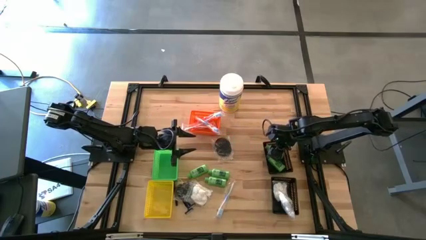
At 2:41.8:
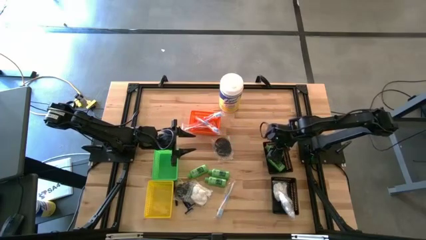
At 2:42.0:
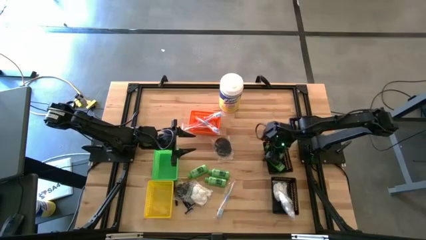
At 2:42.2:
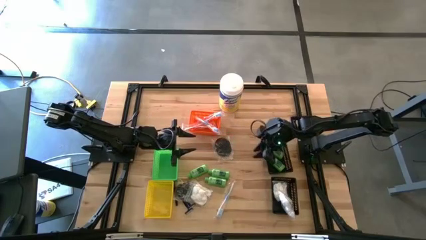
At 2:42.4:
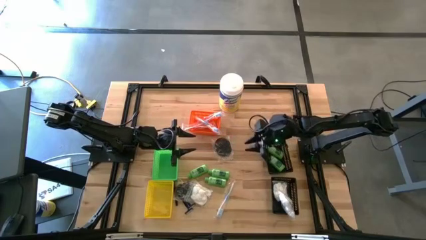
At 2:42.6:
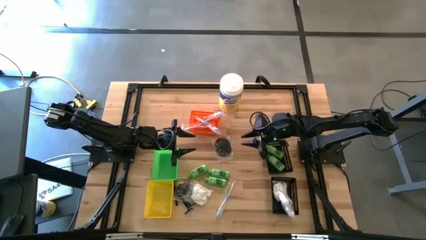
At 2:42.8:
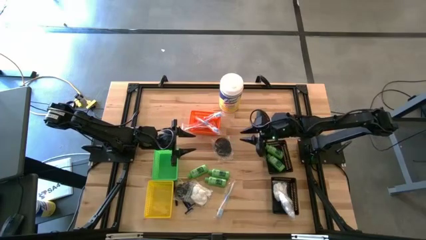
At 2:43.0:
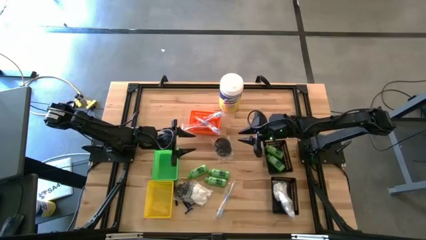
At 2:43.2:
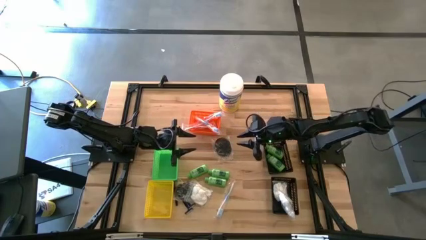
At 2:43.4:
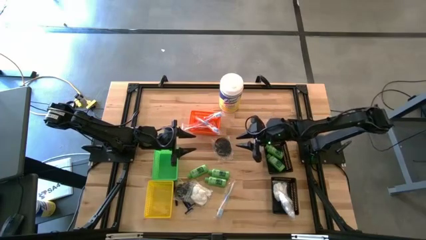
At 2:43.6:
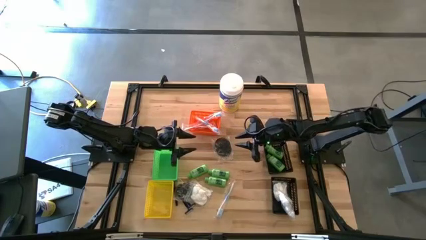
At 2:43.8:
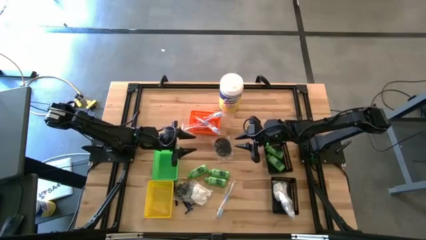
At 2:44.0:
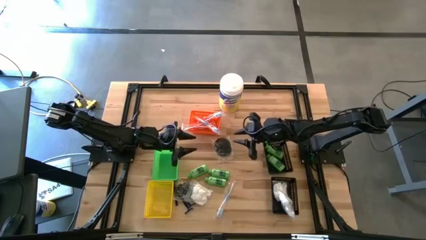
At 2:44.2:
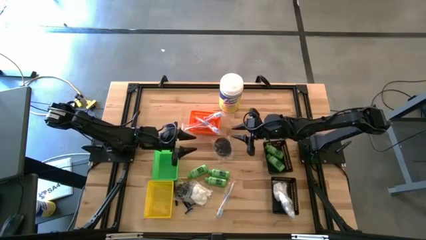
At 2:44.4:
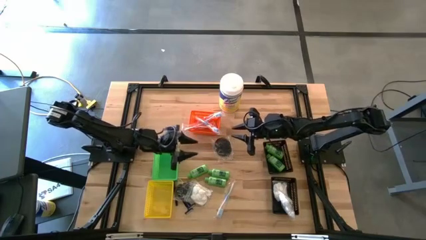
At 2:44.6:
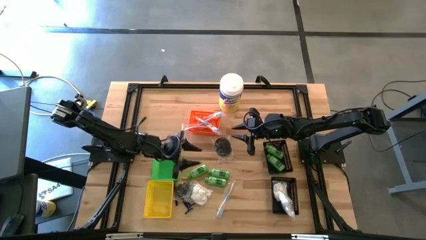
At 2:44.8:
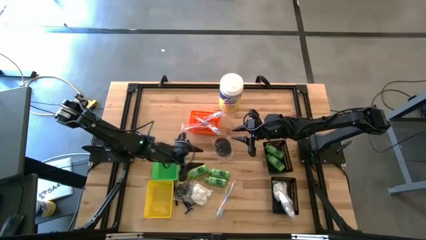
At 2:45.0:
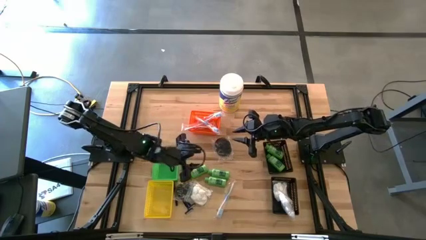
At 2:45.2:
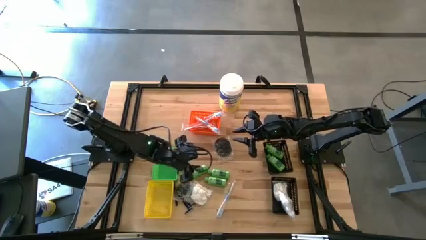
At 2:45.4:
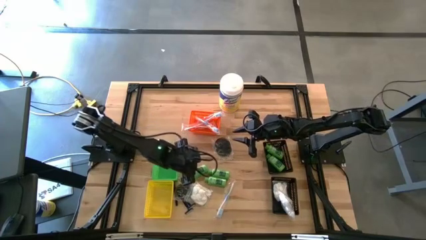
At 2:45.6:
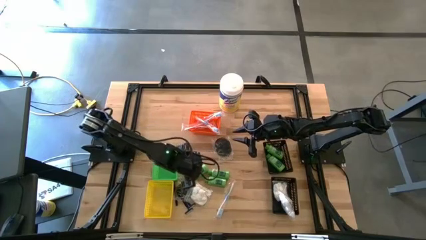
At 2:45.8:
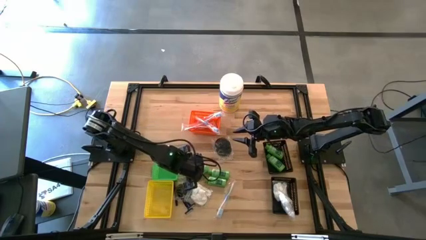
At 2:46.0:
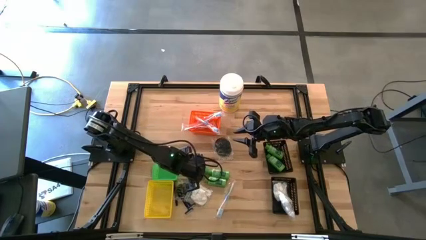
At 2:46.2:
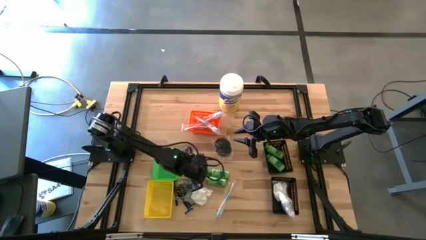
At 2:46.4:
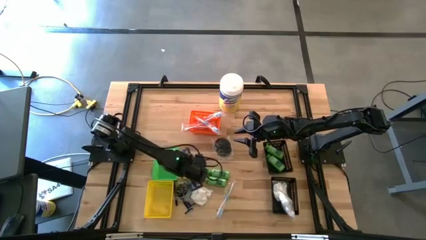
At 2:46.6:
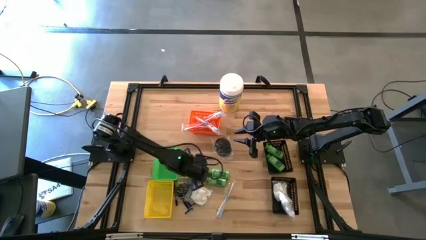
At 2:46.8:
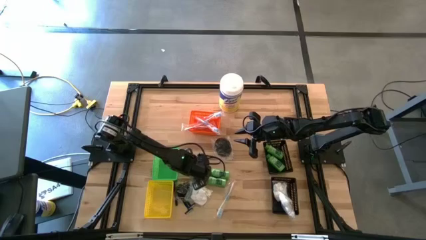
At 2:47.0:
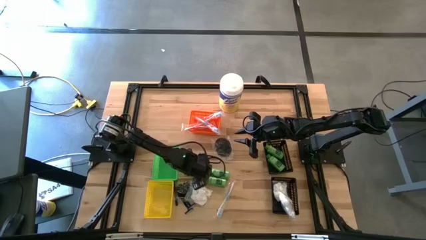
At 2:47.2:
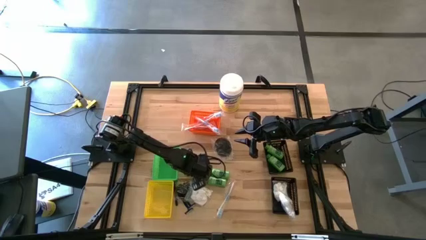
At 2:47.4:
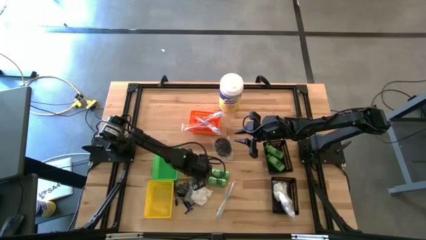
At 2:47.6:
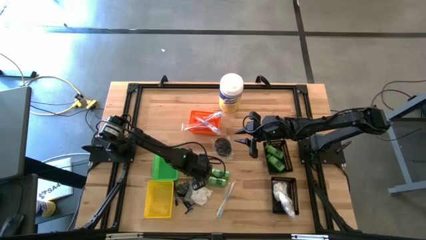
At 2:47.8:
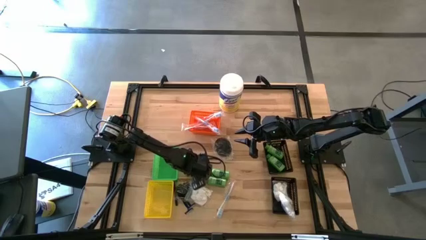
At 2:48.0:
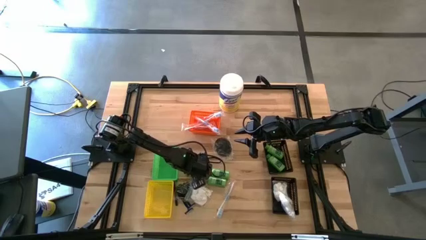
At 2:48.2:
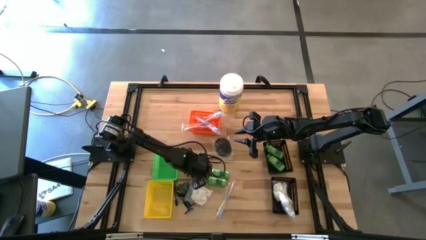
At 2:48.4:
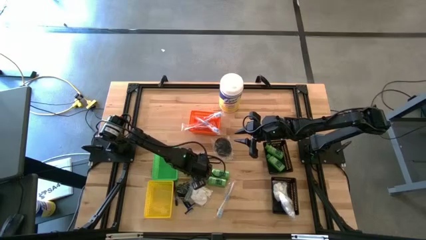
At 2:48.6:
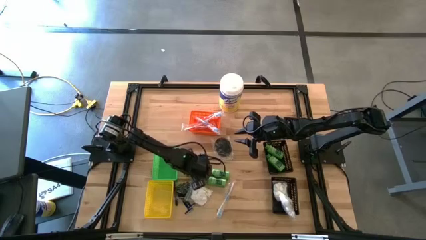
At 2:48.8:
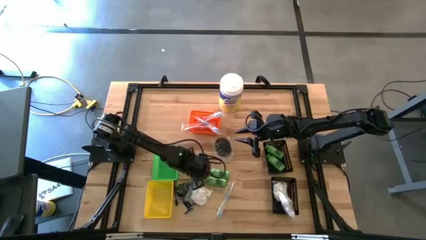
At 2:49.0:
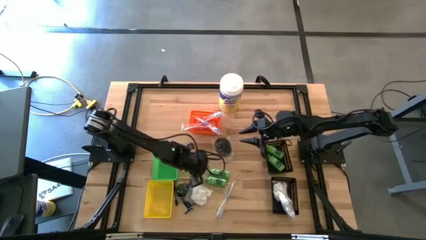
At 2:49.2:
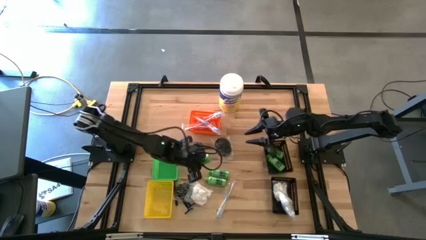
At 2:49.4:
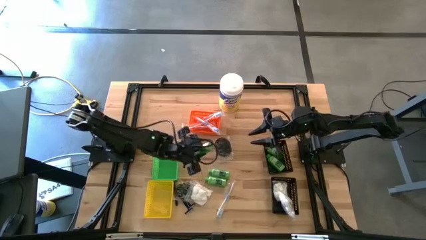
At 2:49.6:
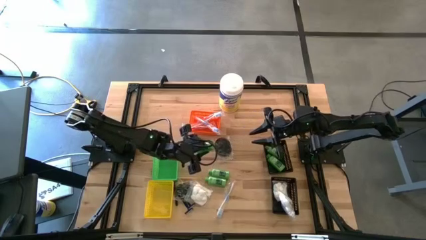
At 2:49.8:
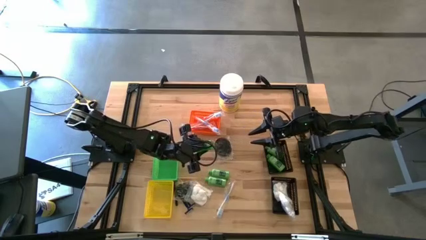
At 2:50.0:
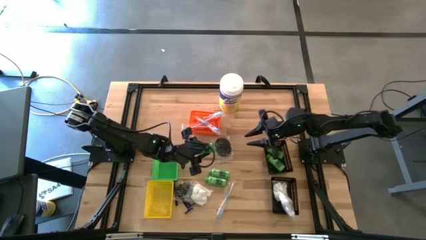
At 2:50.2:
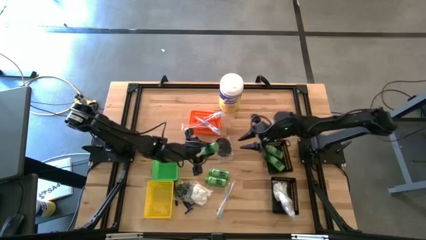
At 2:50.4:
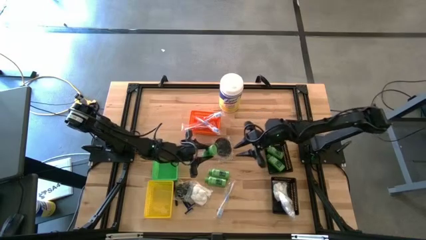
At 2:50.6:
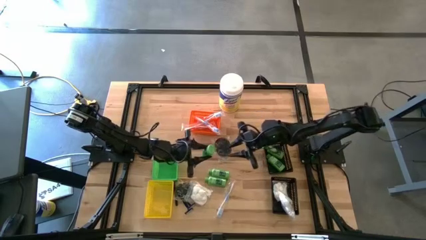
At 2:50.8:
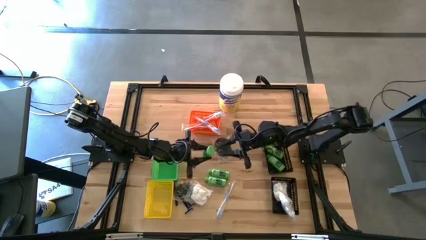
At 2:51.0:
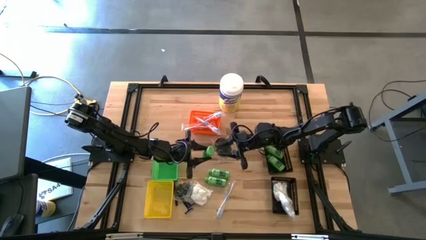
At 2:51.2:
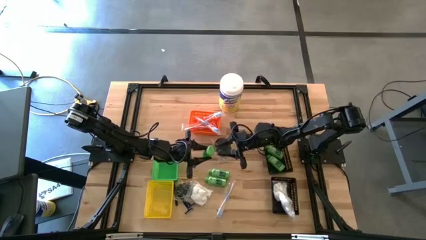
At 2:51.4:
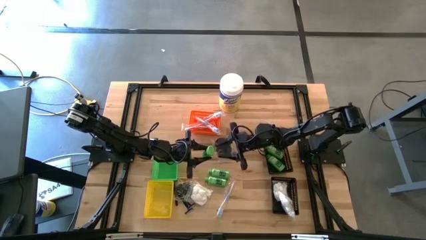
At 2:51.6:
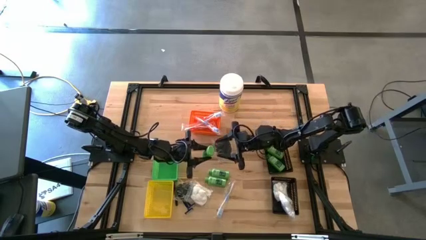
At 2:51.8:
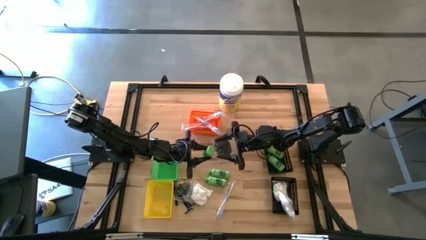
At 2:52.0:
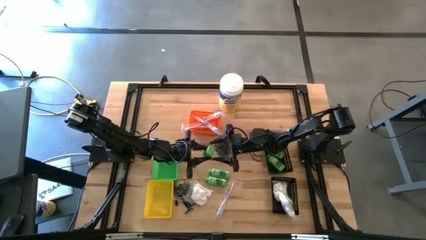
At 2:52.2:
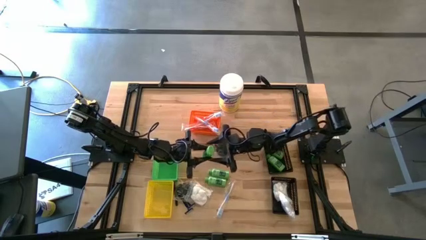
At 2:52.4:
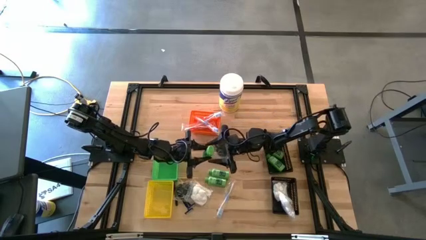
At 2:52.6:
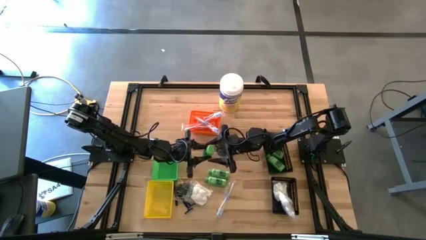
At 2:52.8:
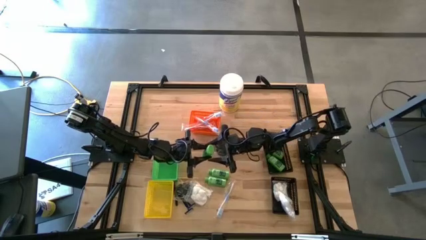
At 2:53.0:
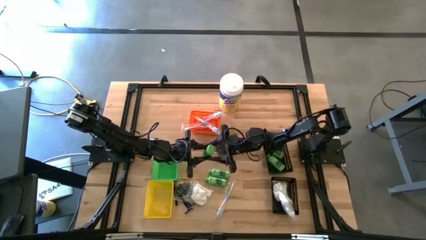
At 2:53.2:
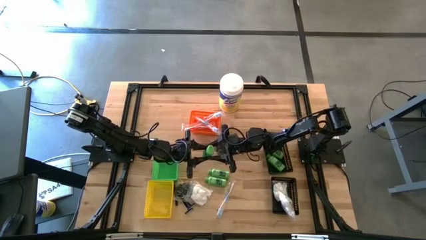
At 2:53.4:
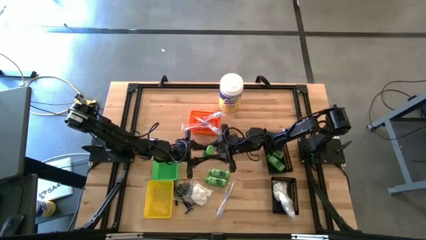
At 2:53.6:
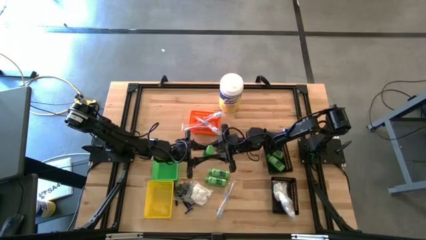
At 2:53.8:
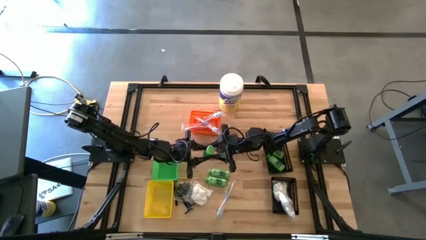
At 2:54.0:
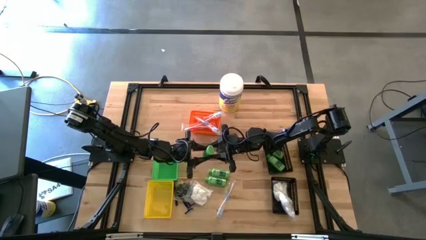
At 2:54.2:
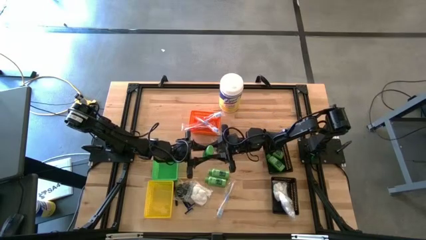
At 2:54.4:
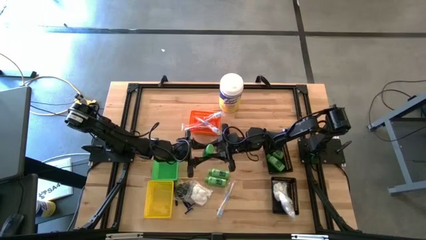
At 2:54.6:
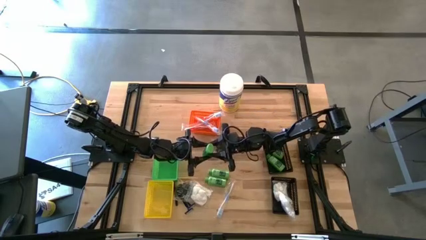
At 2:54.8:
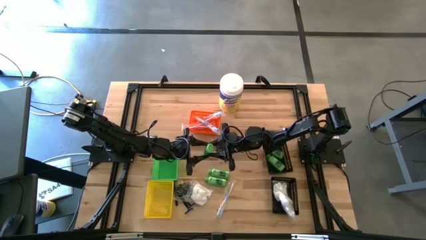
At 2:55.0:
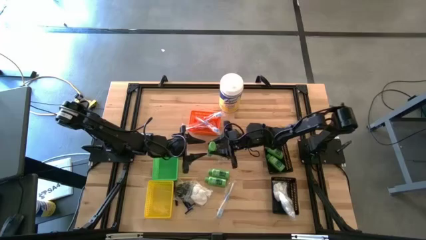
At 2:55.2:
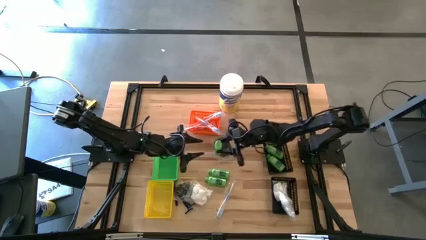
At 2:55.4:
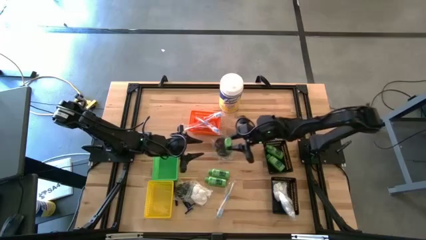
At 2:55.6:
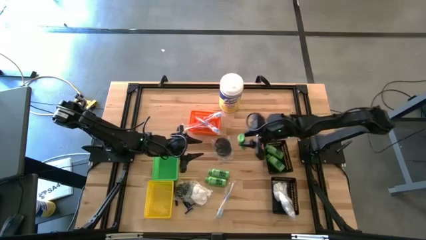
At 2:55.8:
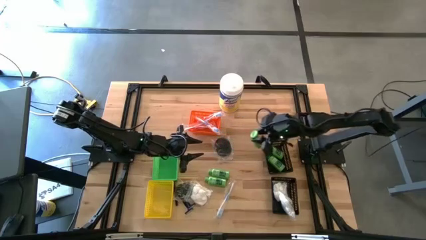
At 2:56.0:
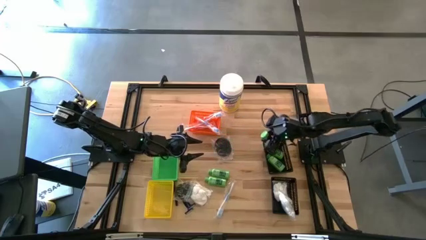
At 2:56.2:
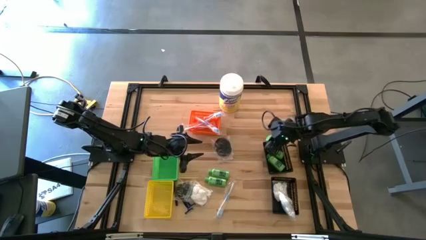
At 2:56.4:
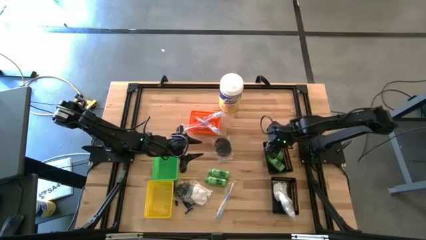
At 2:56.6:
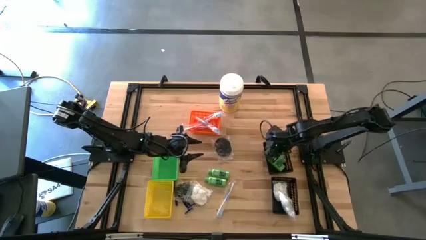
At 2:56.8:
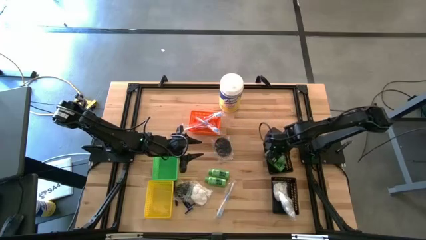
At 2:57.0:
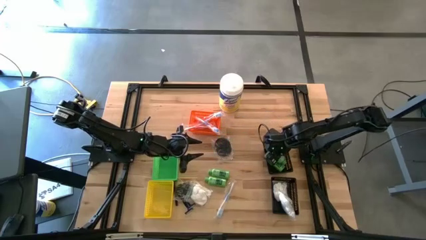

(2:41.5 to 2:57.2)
Task: Pick & Place Travel size toiletries
Put the green shampoo into the top black bin
